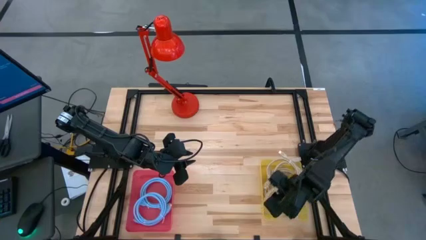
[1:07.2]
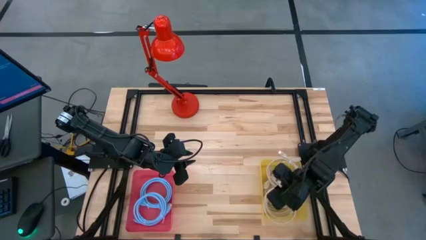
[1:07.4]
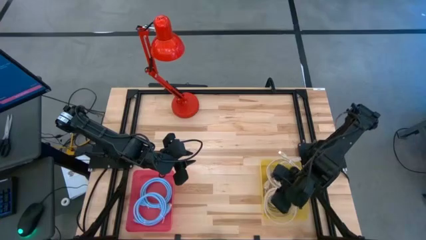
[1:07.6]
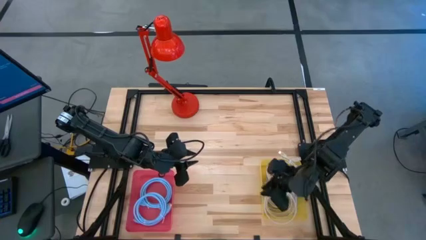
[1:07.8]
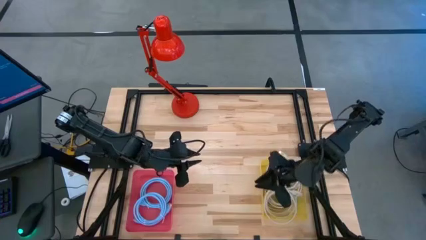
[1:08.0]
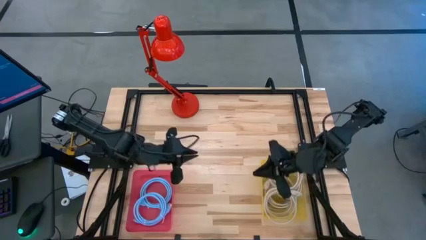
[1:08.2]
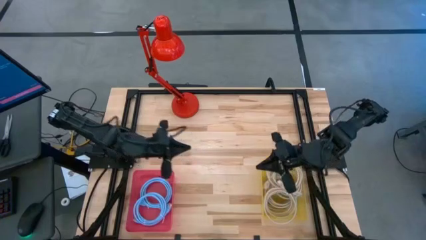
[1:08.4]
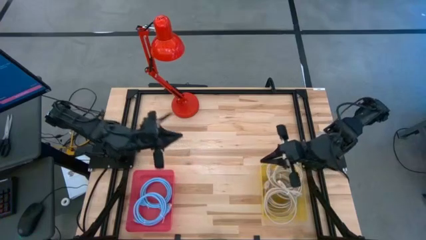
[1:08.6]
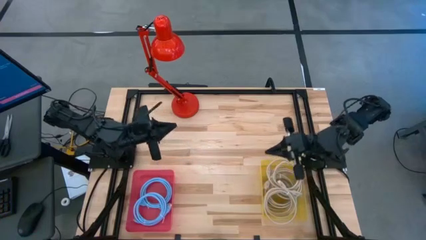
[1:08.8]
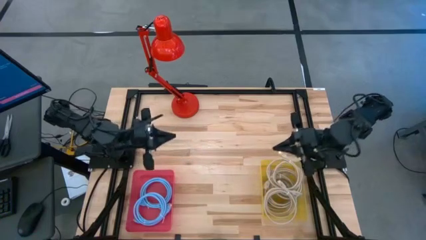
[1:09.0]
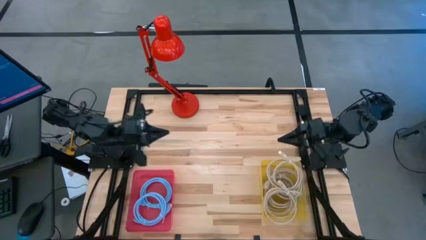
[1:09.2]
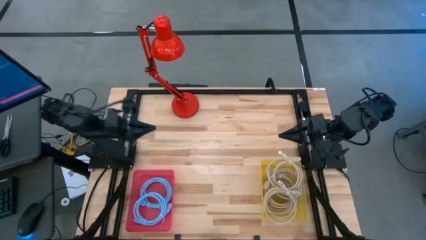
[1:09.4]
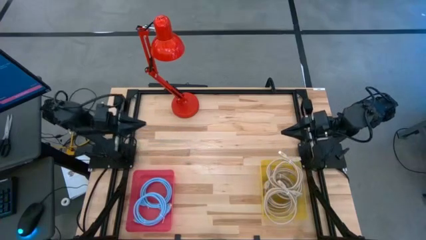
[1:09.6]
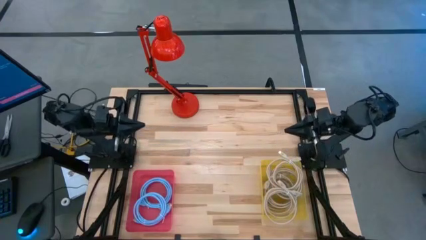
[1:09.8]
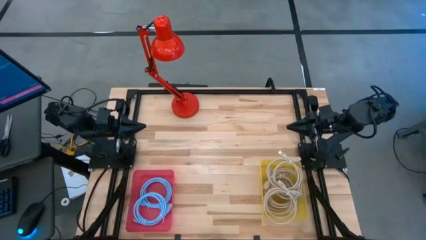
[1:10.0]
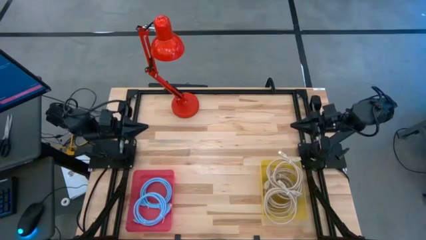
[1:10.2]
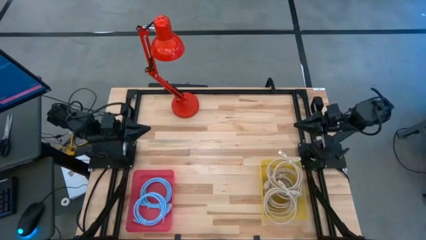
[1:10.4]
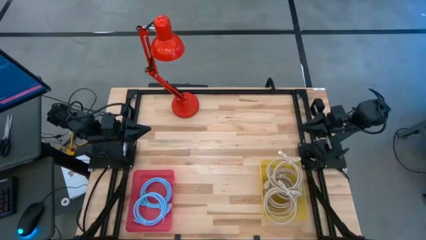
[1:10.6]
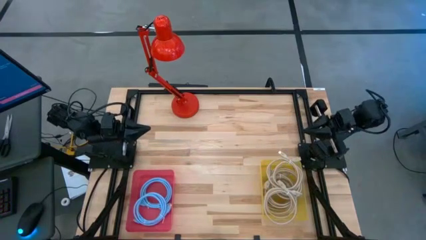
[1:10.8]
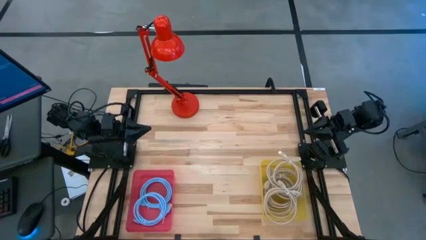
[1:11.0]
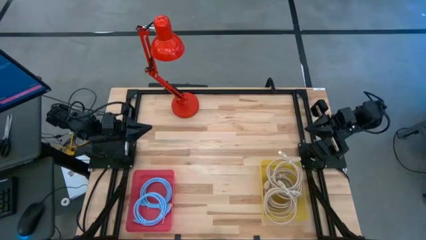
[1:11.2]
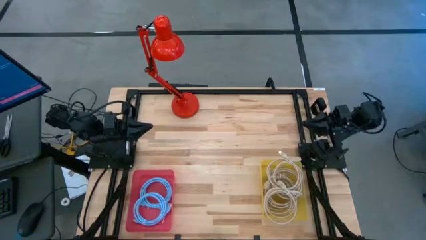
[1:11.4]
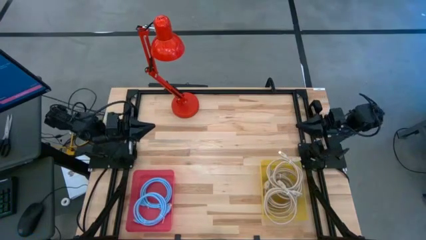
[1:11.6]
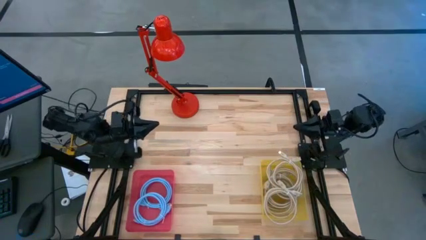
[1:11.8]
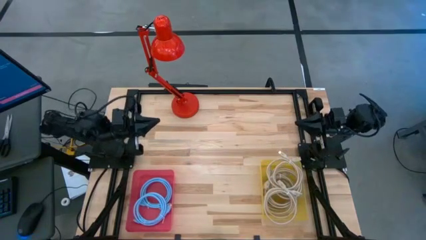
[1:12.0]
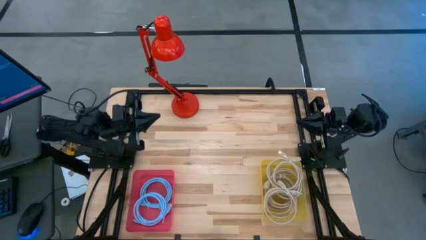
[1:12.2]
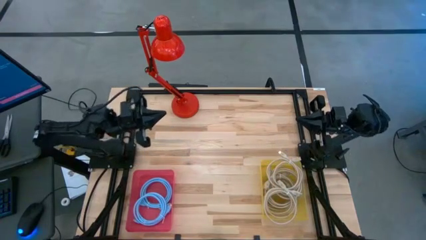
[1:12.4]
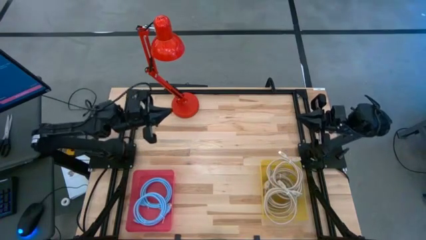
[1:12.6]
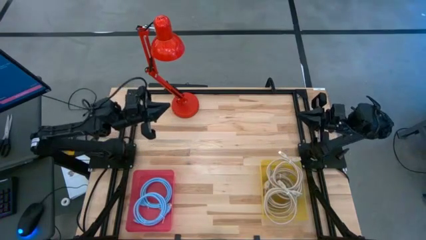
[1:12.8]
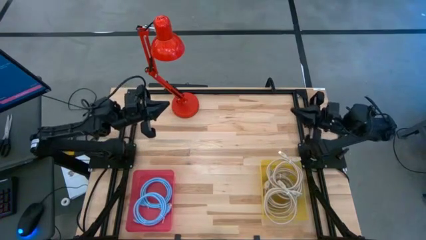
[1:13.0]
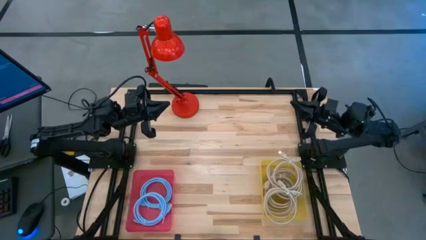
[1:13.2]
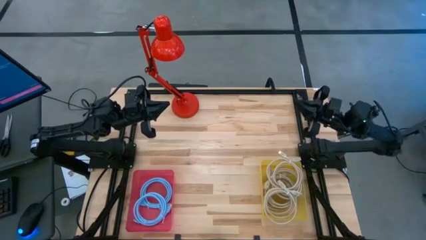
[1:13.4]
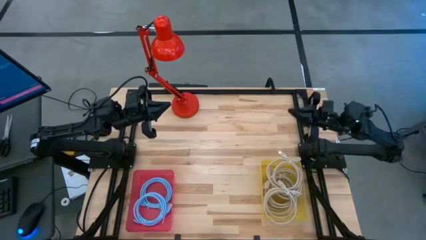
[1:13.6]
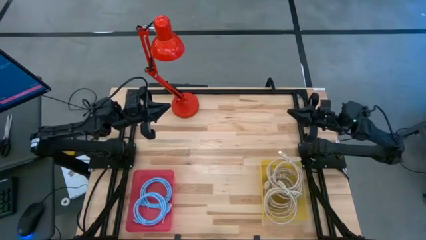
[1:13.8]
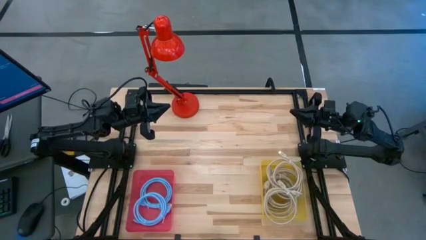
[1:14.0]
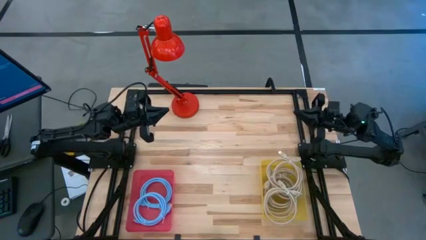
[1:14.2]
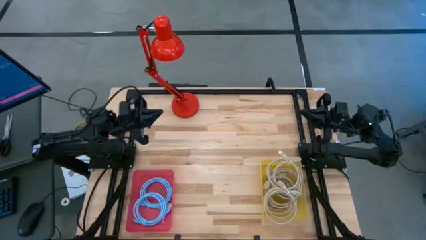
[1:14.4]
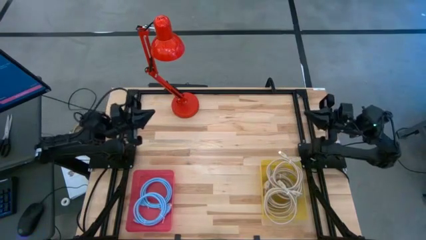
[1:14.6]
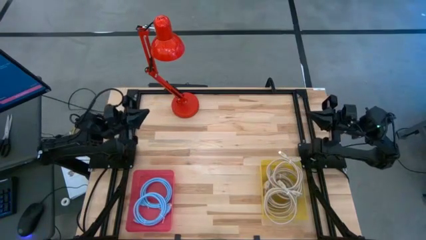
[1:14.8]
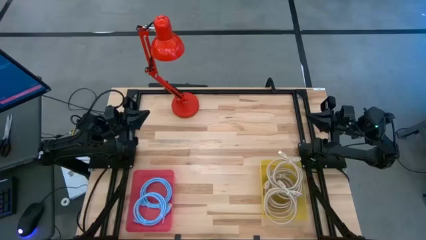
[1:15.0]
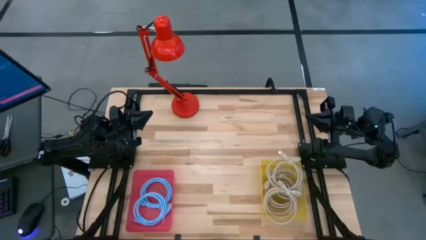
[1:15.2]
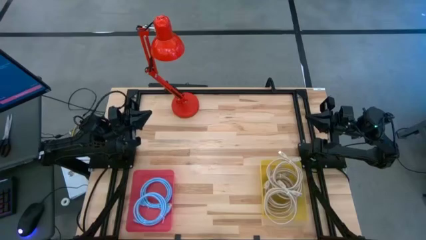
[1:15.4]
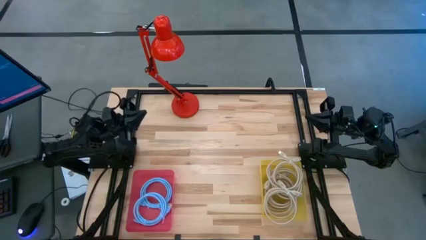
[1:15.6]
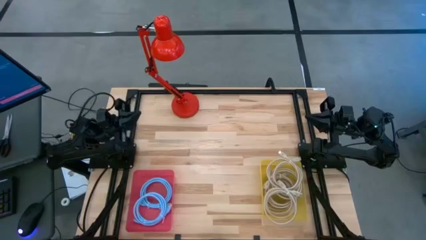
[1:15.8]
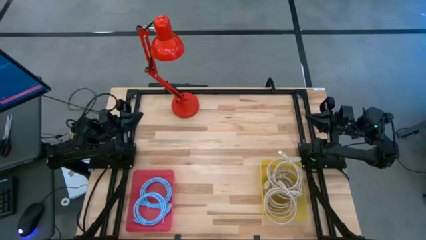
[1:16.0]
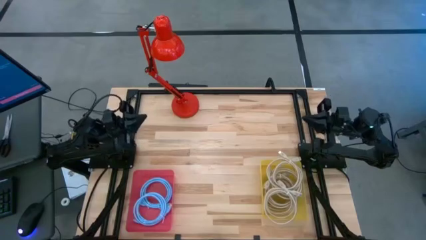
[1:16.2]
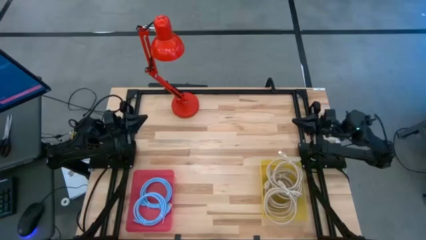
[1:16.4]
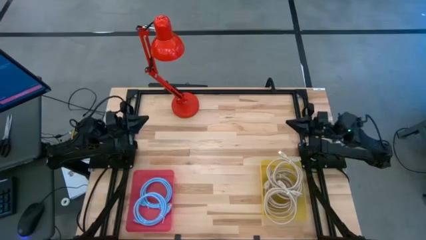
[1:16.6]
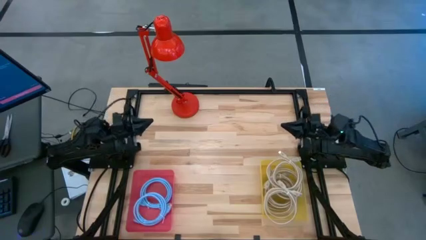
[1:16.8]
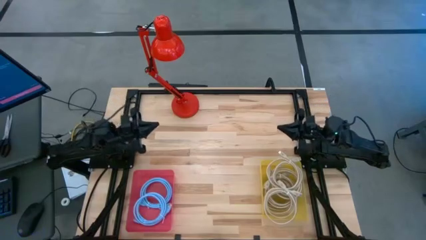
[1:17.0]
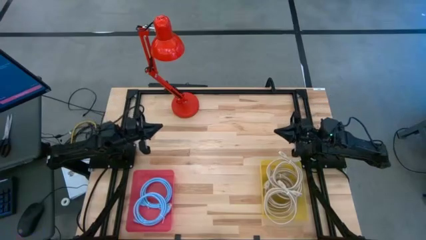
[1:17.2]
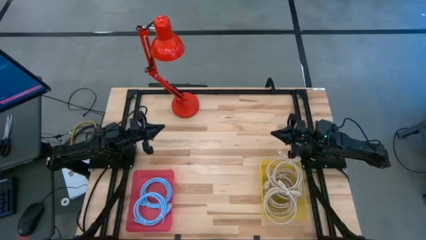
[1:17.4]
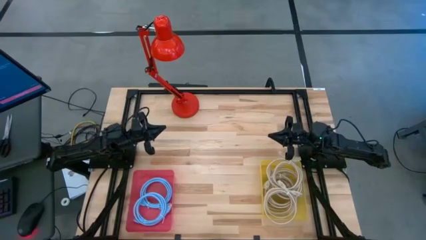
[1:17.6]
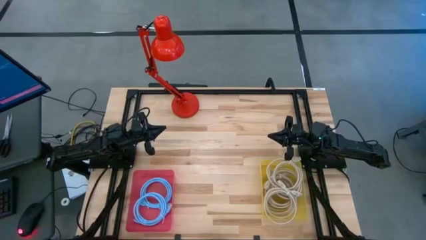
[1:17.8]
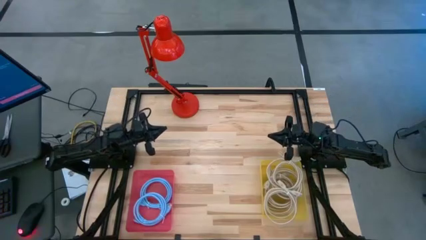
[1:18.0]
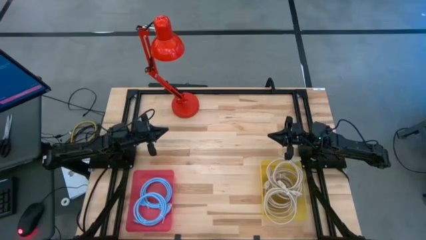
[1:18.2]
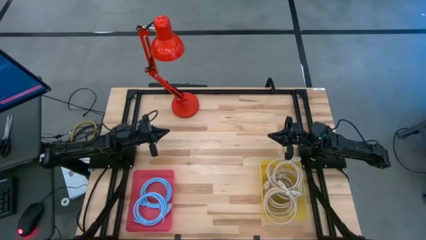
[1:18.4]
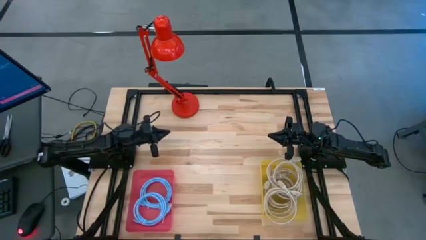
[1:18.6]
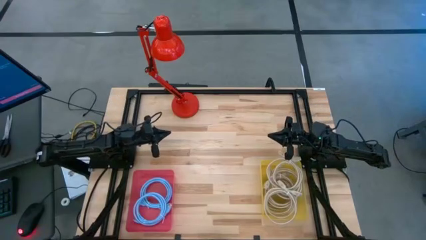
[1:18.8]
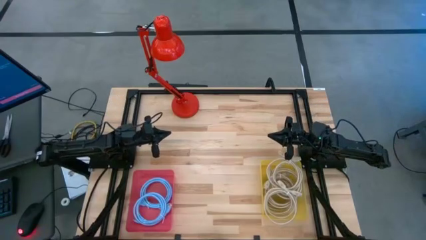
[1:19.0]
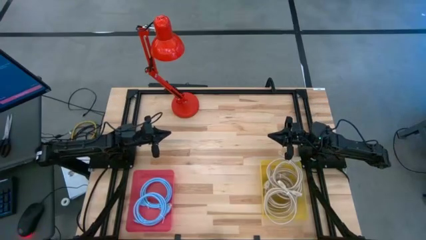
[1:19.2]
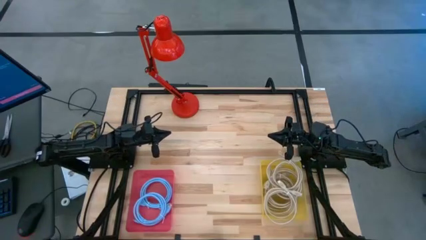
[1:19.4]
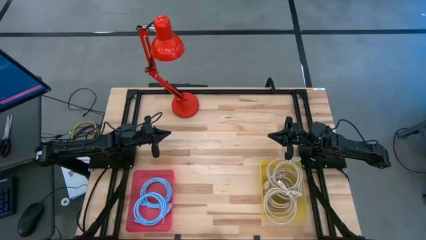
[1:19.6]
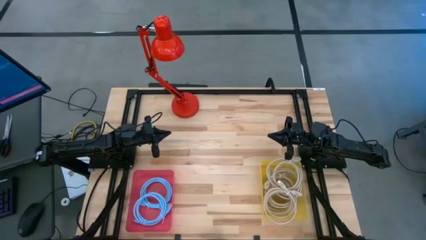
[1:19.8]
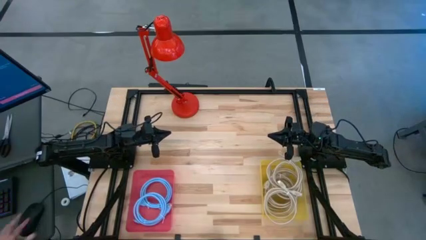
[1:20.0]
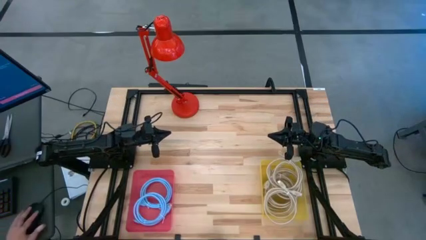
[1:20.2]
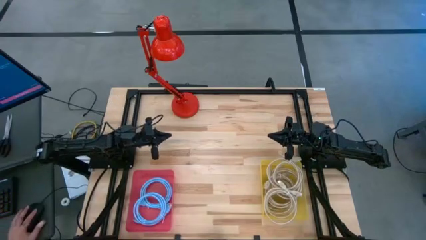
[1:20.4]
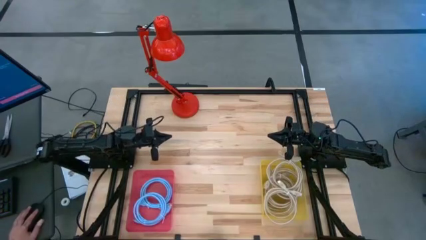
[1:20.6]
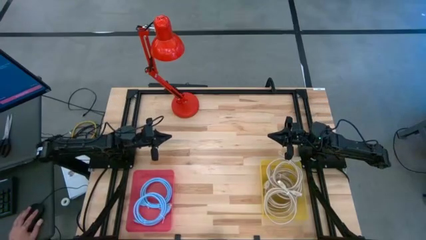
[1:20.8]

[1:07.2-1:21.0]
Task: Pick & Place USB Port
Return to Home Position
